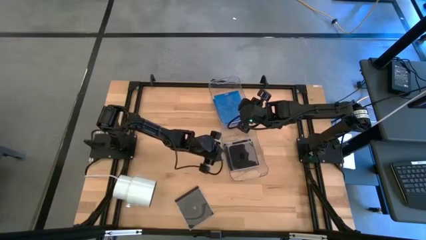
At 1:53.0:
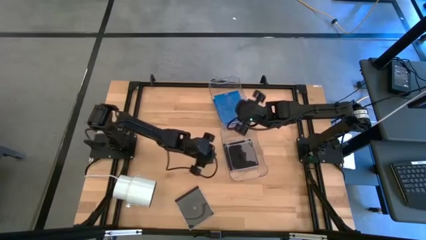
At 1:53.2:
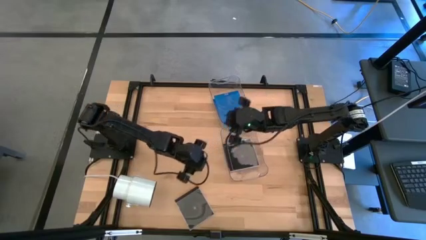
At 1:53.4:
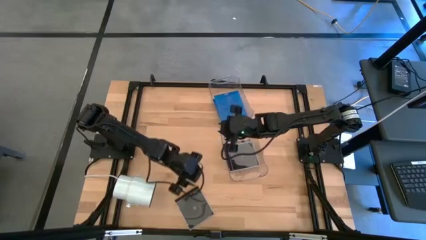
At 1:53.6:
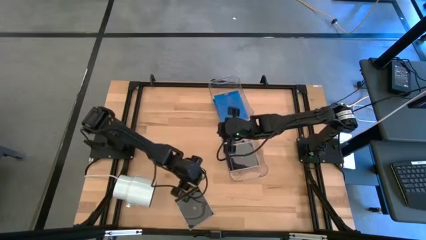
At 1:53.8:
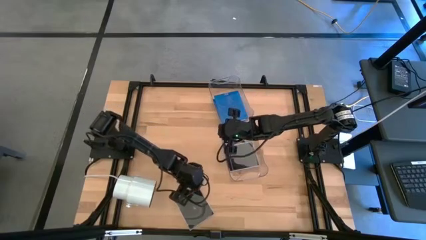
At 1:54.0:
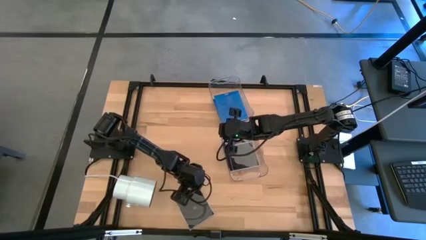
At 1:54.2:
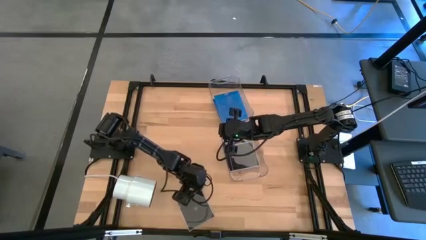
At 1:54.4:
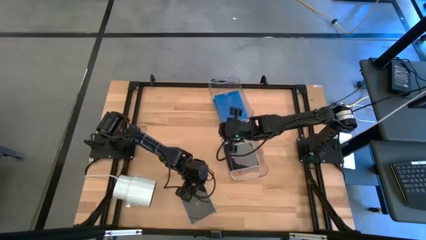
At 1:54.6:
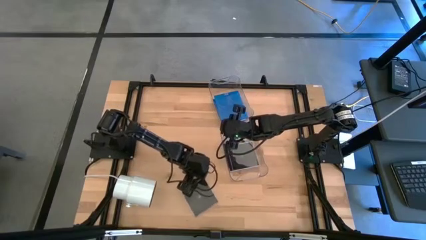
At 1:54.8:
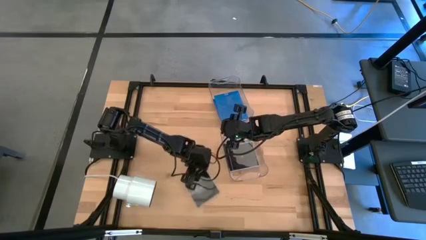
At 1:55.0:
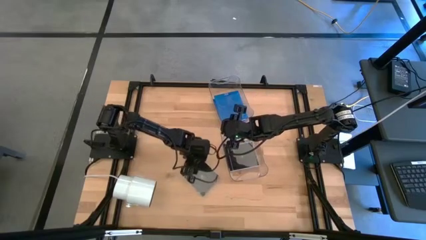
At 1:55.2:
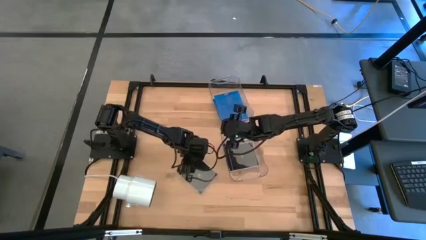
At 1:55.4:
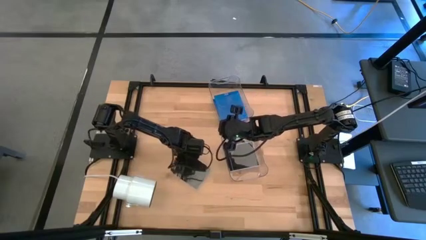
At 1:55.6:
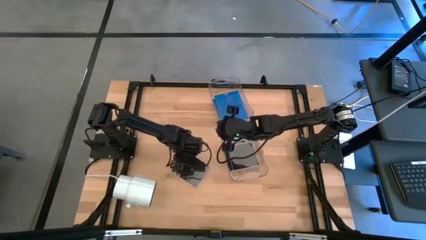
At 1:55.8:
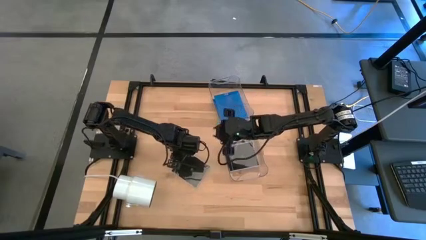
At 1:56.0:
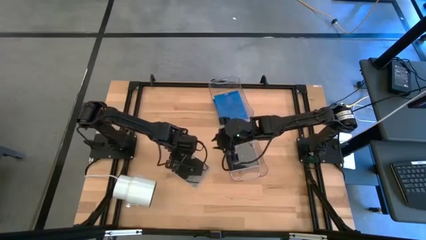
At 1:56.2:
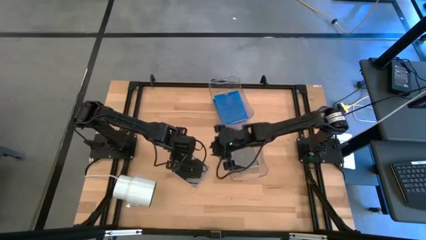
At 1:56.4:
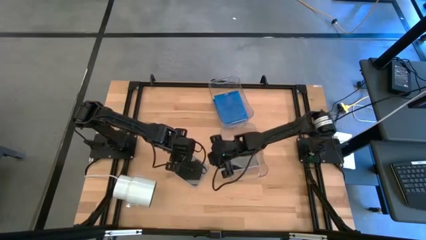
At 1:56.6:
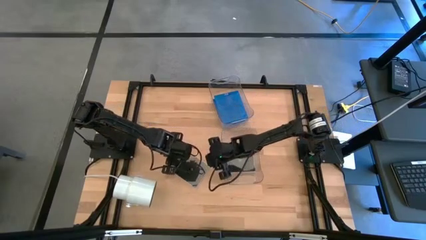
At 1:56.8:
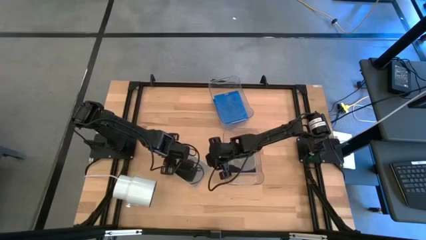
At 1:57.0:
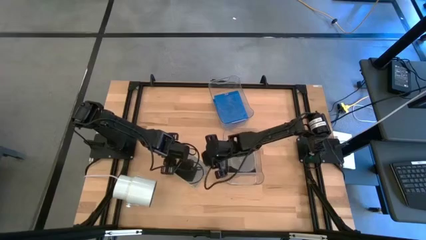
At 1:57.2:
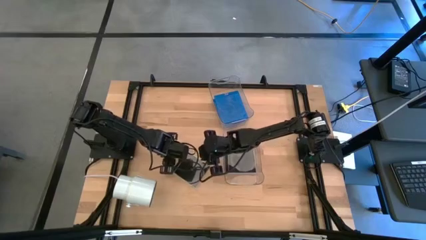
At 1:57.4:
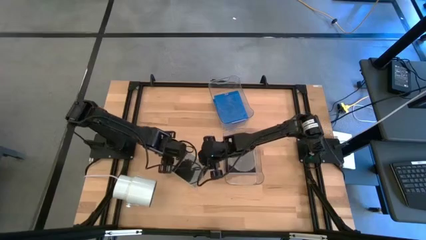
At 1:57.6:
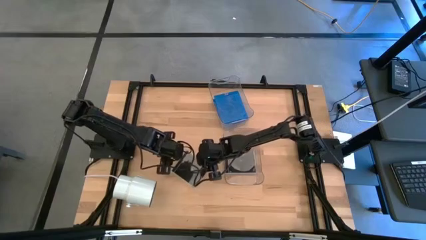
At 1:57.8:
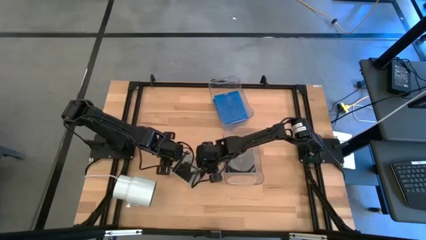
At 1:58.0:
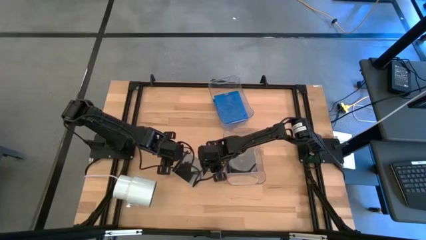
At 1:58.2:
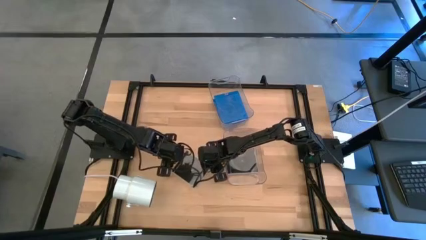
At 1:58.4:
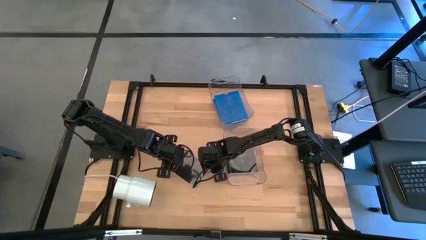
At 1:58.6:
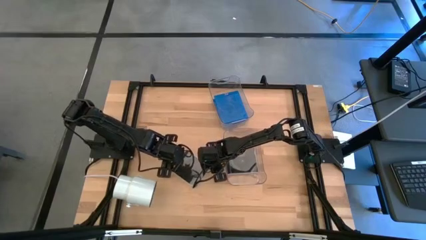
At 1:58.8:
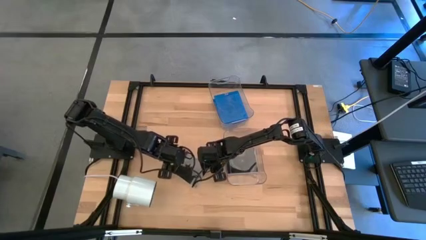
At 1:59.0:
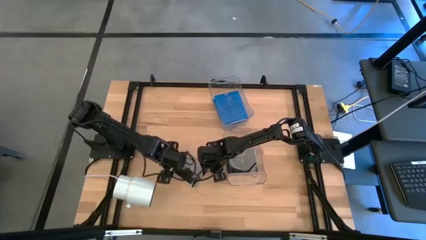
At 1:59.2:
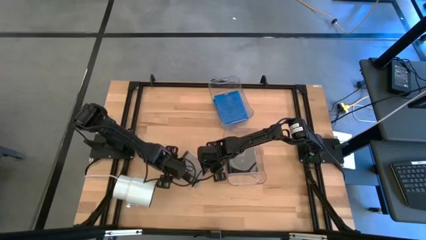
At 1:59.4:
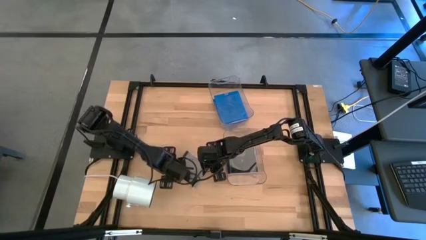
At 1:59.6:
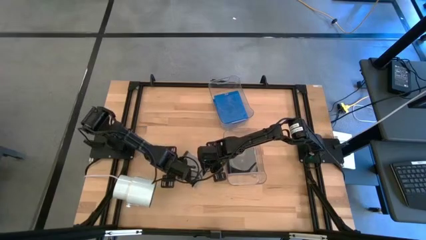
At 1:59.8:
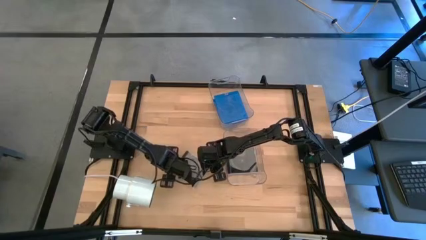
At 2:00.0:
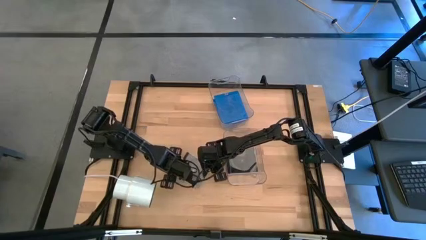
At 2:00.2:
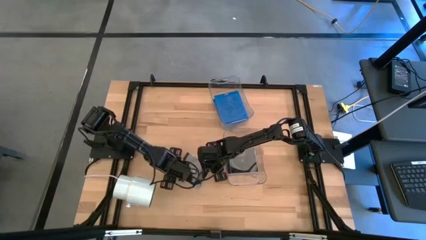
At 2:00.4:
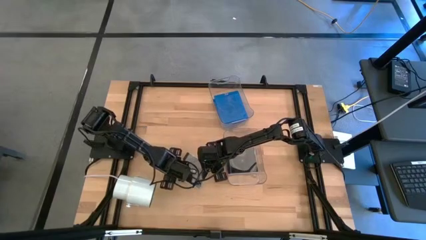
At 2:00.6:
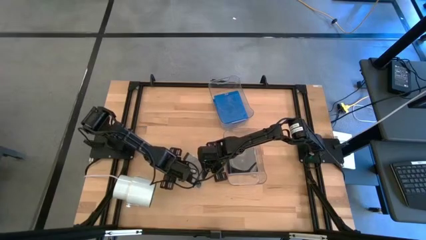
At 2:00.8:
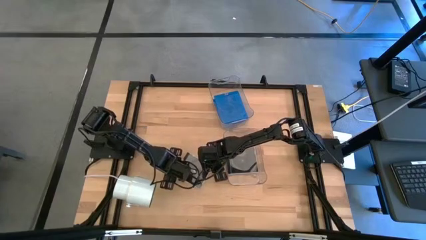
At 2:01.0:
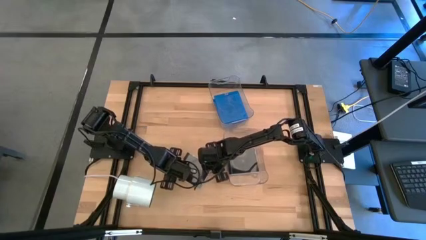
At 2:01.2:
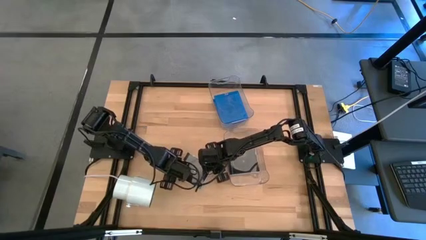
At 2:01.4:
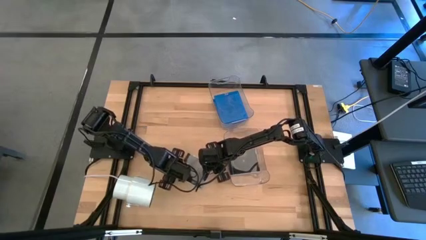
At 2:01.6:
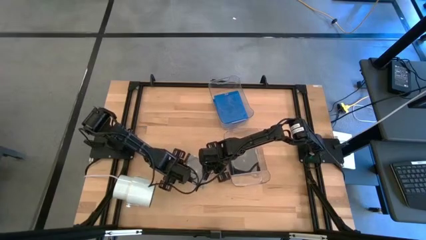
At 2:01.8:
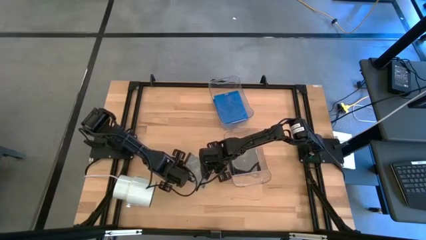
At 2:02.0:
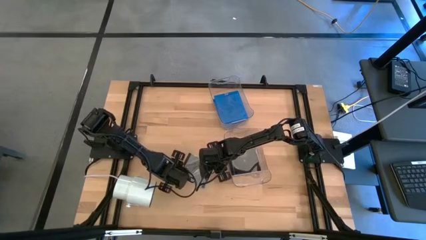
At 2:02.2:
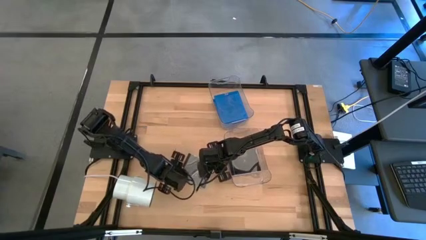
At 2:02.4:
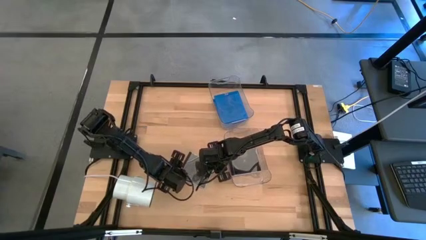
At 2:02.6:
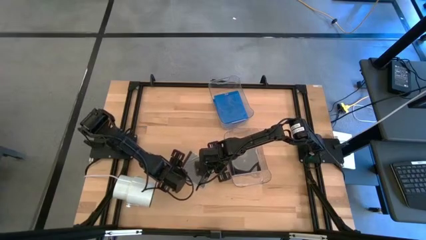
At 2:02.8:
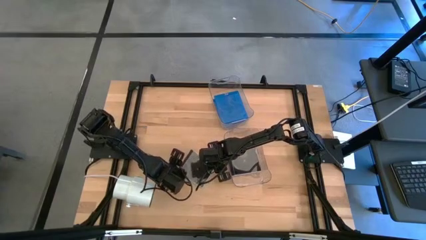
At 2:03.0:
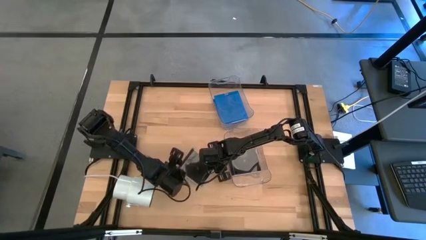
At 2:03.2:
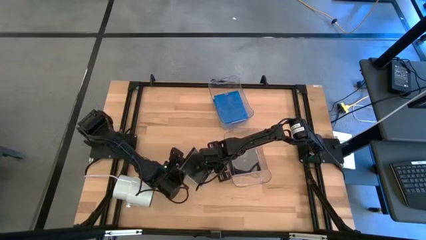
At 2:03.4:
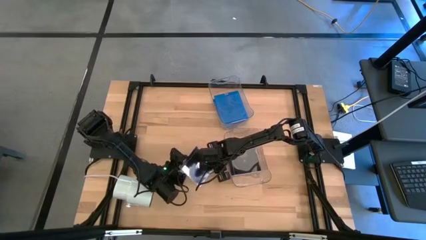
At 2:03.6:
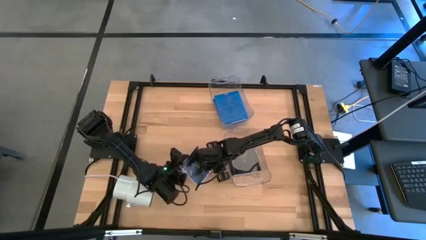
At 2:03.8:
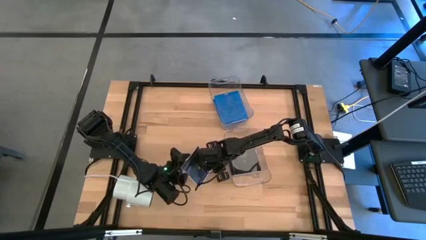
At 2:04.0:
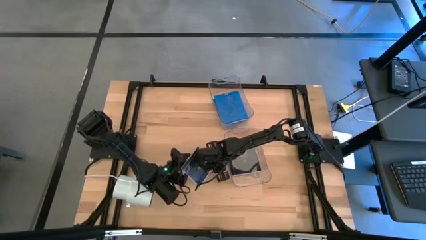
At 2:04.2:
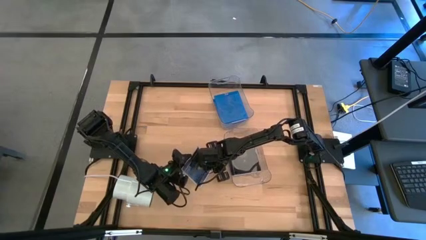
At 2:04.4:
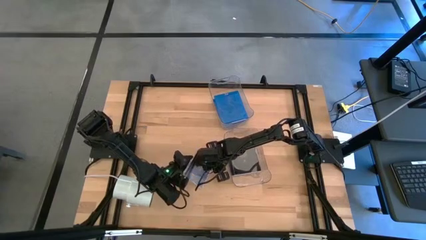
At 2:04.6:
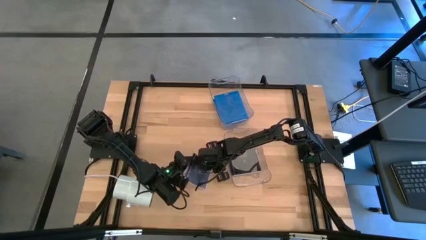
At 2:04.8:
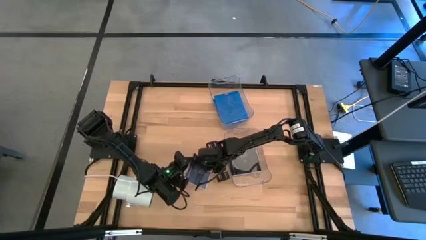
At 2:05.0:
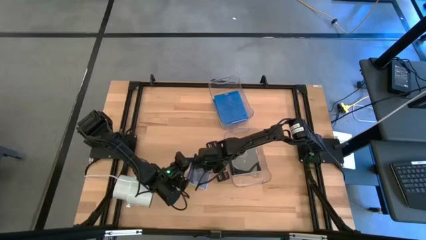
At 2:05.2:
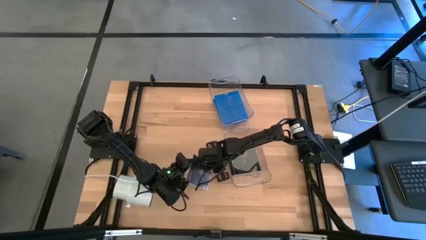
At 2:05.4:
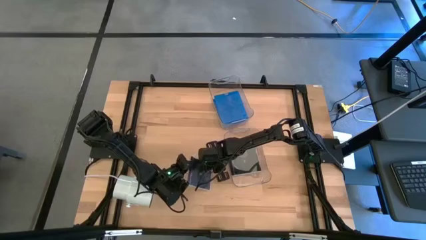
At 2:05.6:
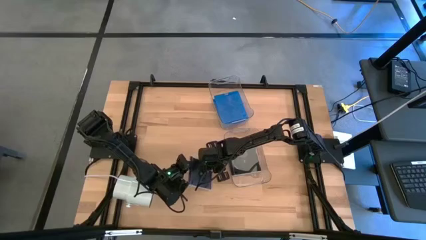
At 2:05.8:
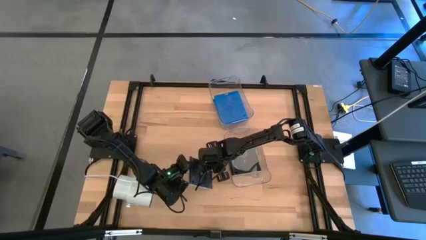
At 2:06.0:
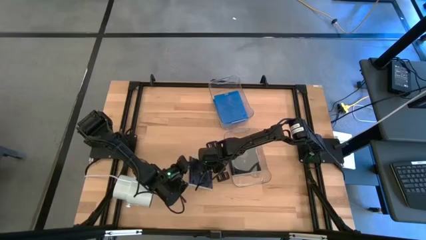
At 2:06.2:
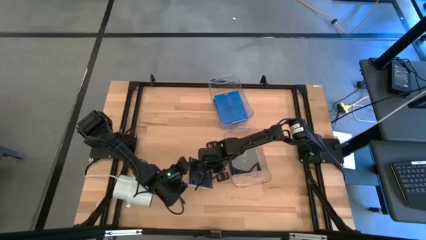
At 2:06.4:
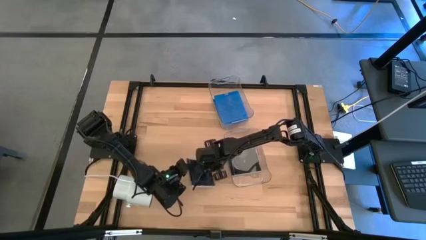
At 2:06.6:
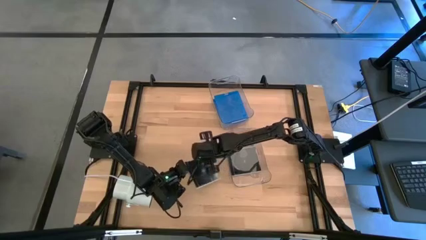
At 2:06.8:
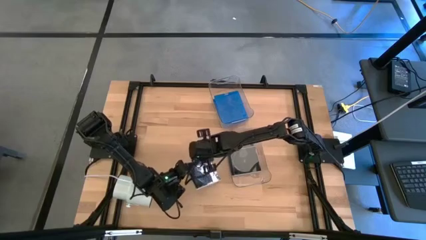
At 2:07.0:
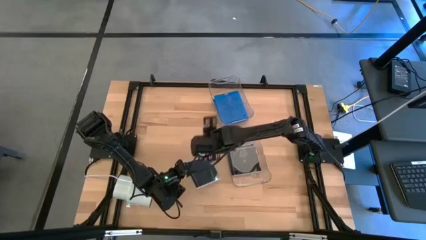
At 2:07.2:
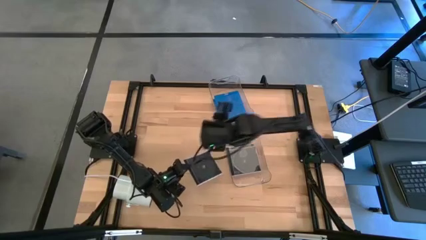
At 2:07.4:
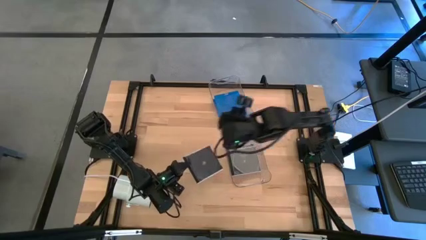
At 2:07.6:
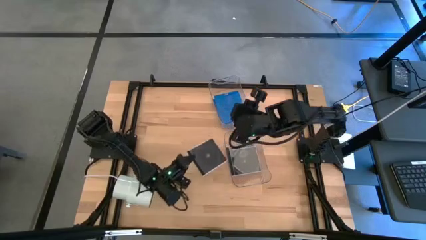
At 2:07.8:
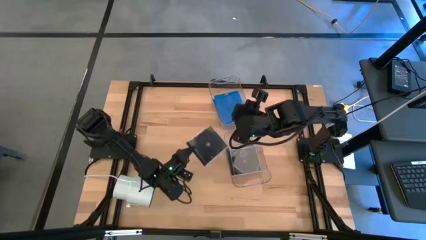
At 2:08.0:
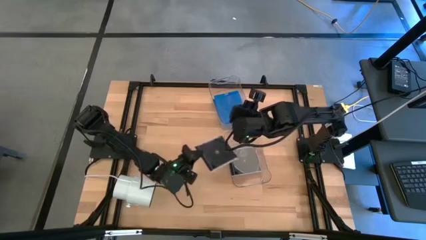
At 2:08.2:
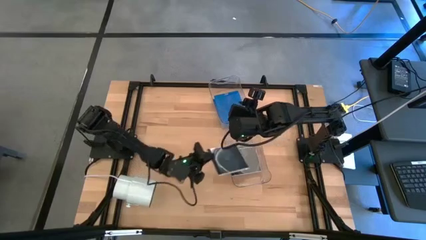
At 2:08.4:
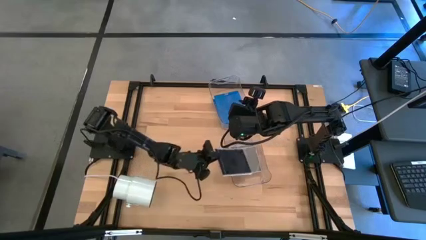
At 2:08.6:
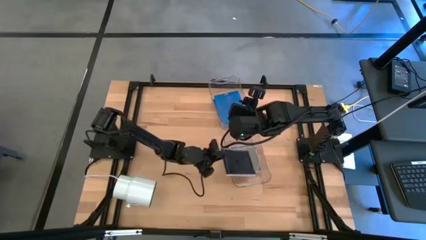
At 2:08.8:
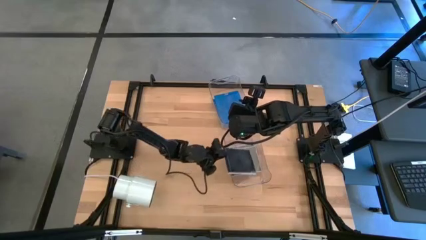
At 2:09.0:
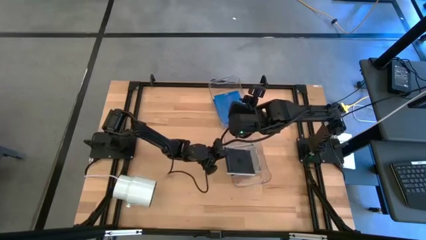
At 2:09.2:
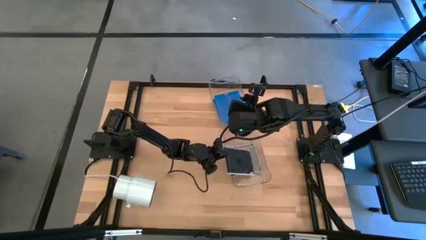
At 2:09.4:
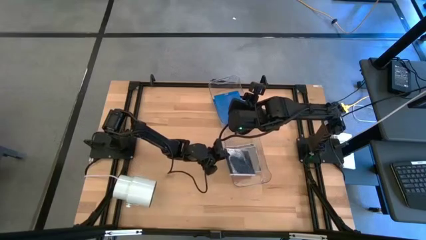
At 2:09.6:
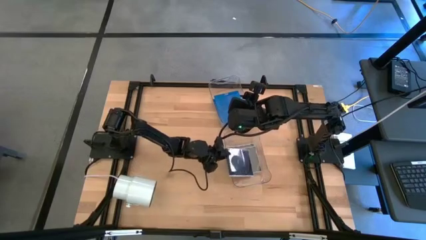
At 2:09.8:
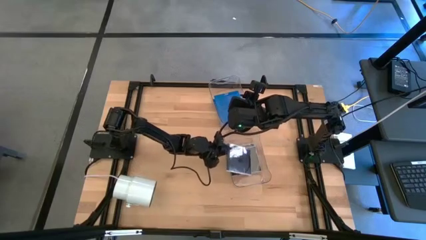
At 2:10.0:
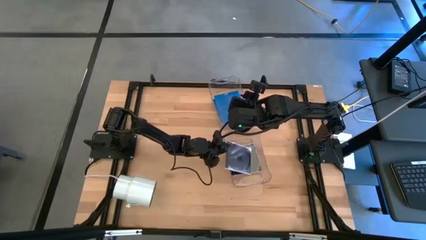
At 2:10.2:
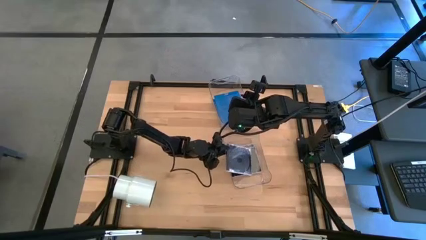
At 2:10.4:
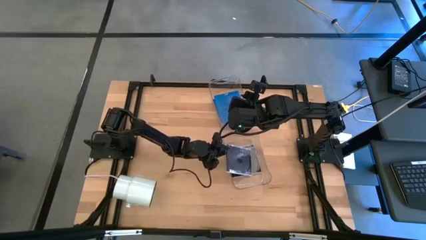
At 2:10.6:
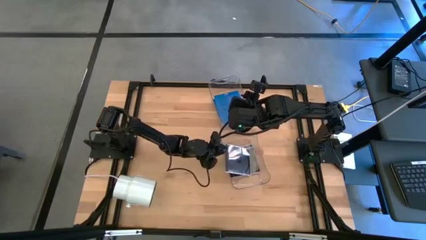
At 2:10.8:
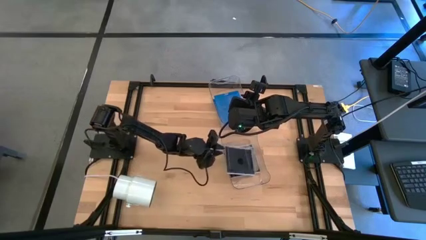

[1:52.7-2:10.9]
Task: Pick & place jewel cases by type
Put the black CD case into the bottom transparent bin
